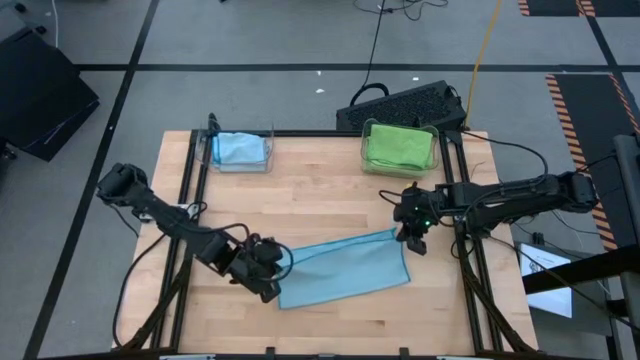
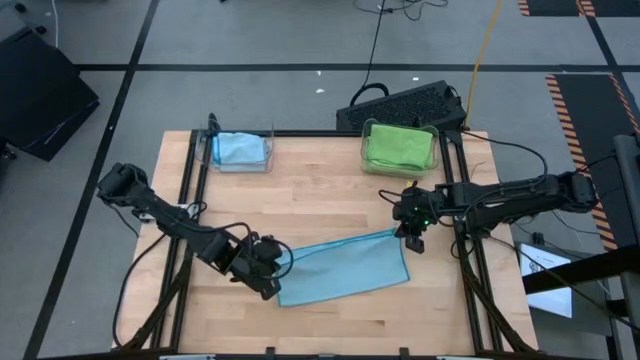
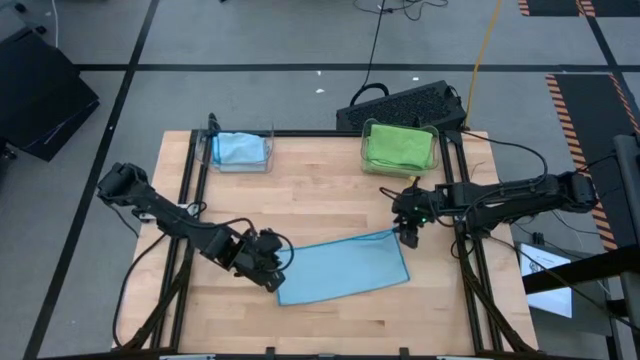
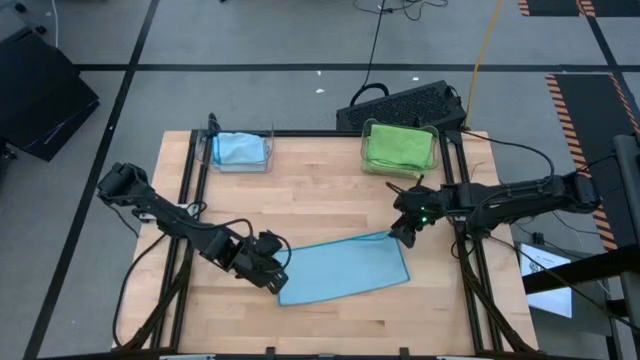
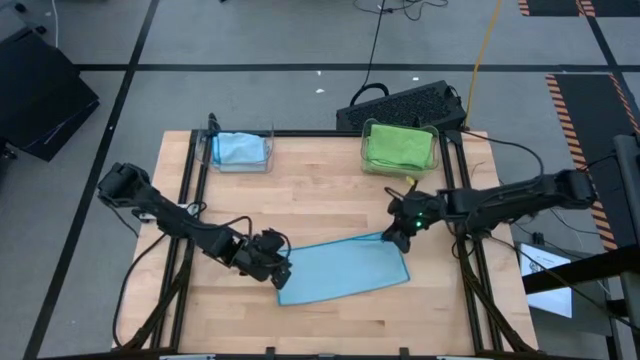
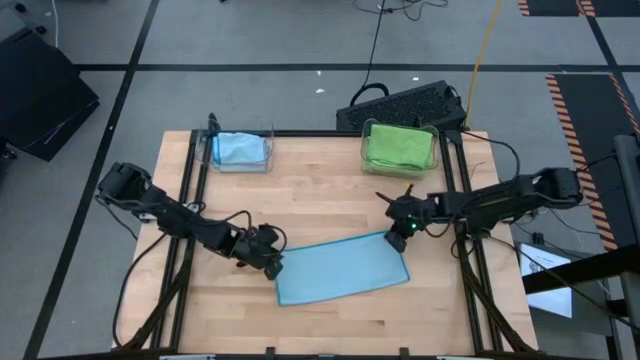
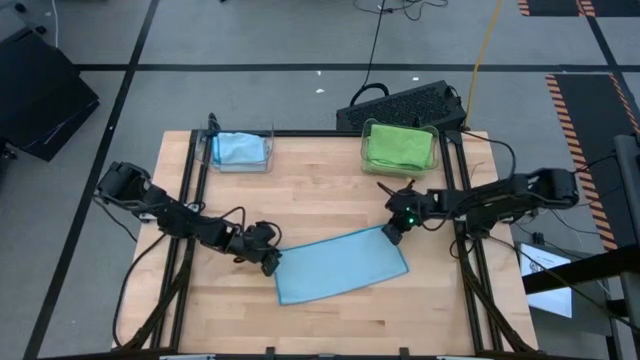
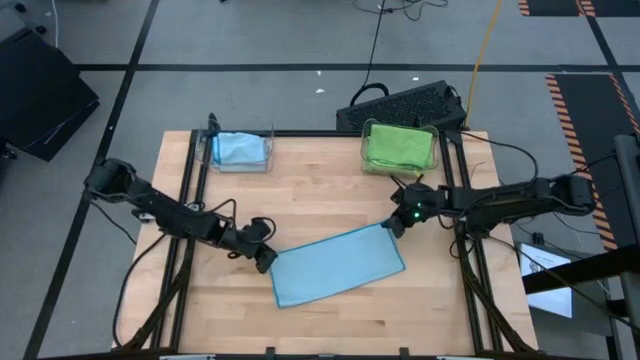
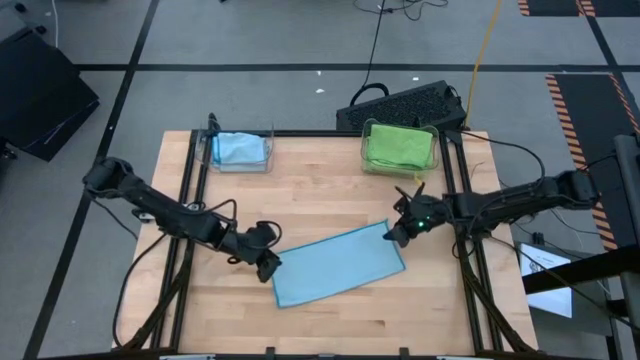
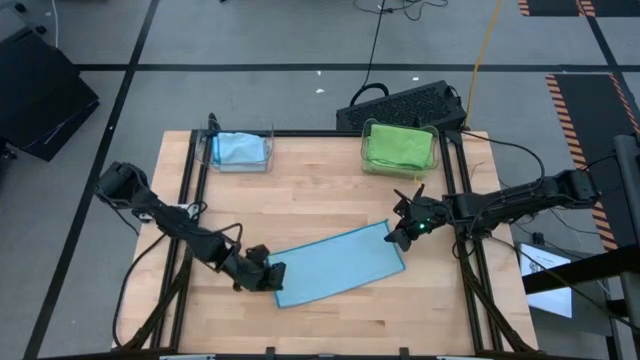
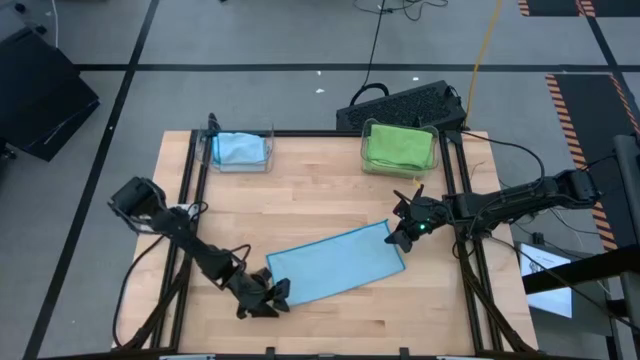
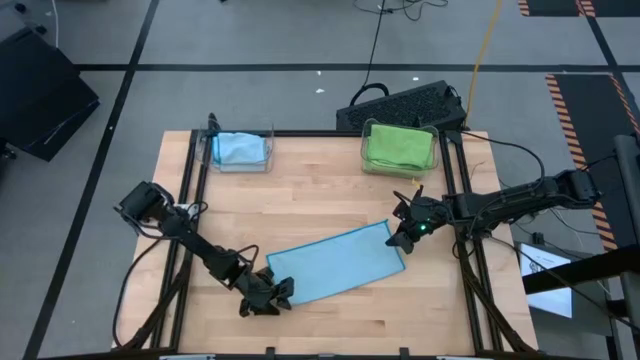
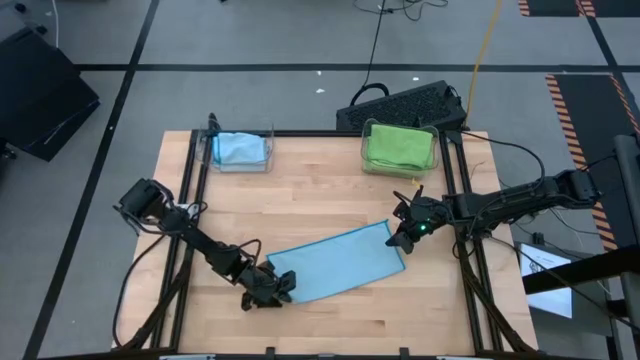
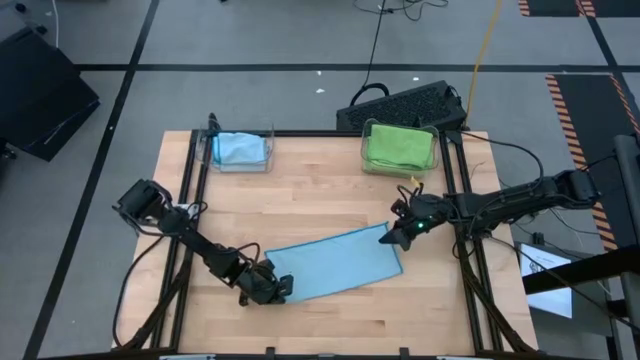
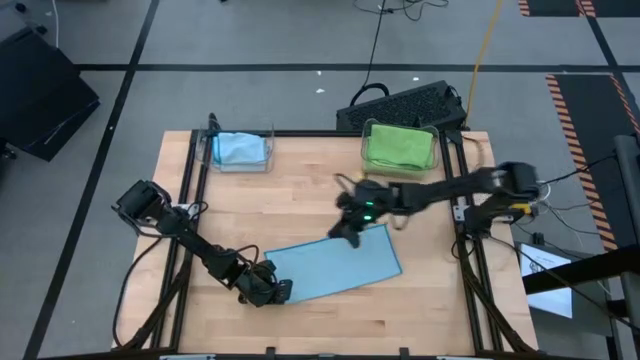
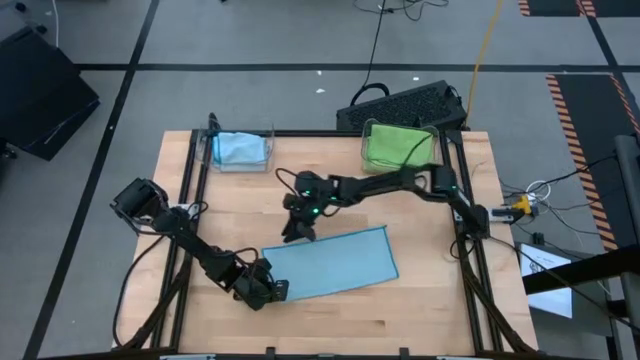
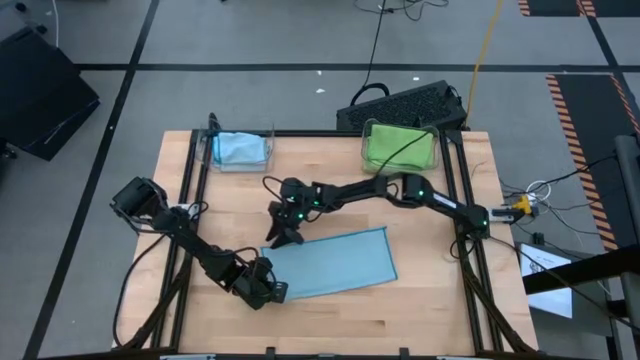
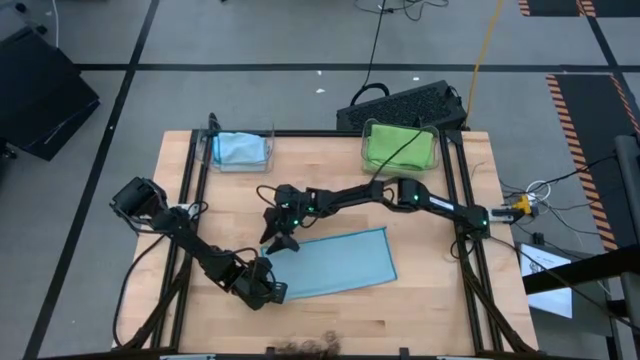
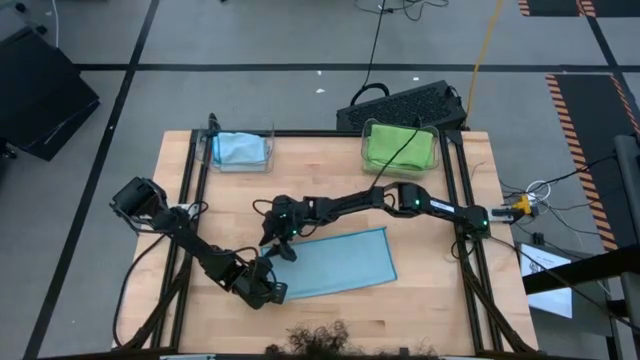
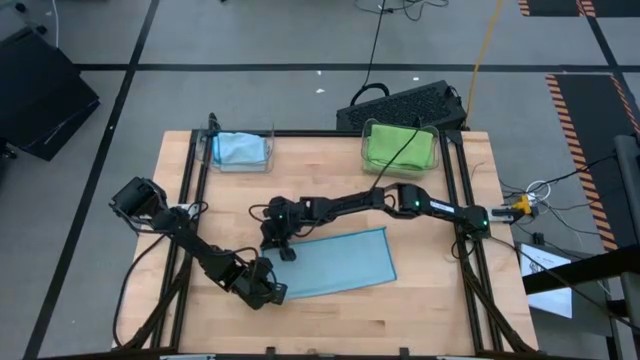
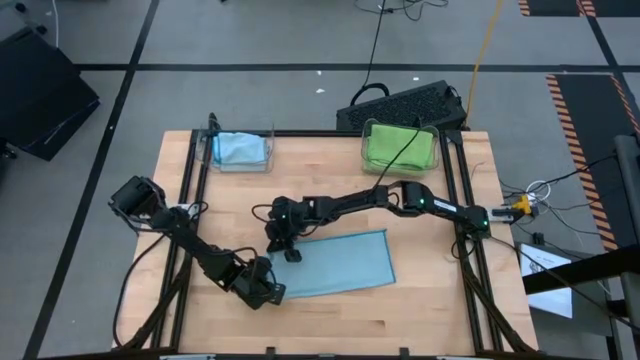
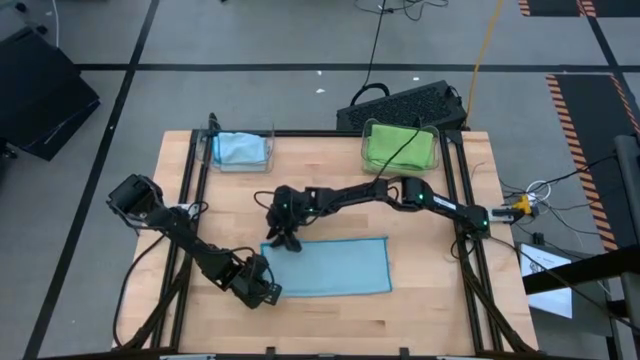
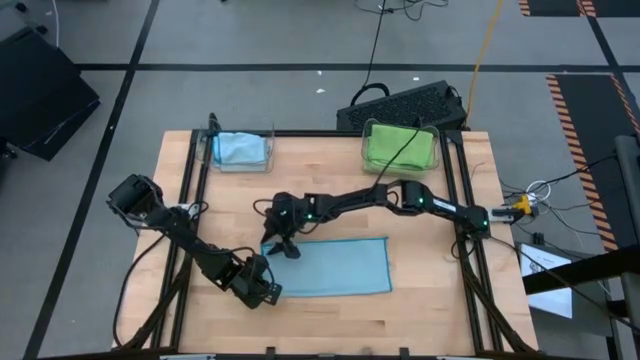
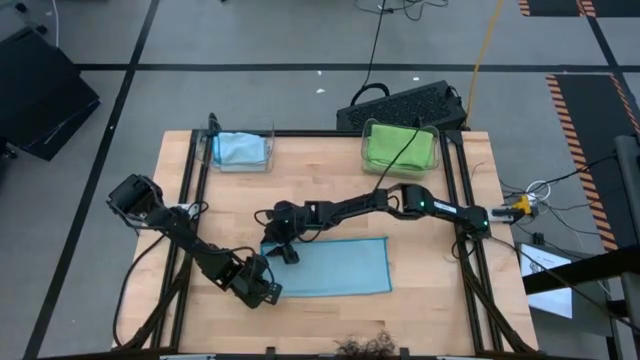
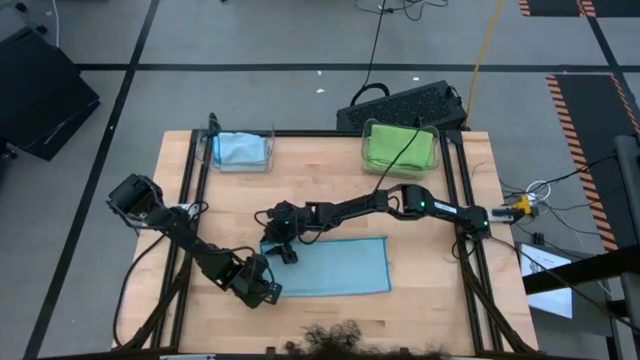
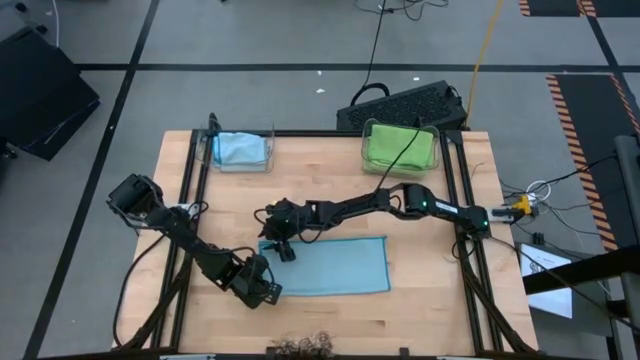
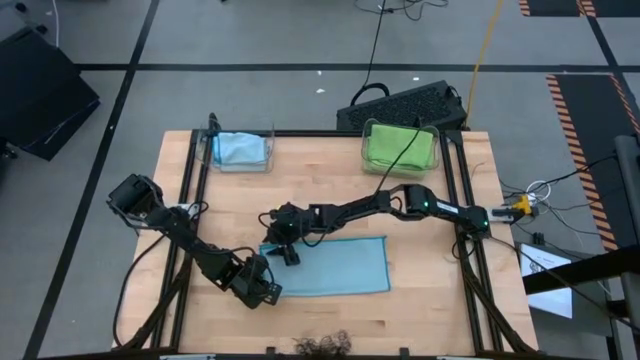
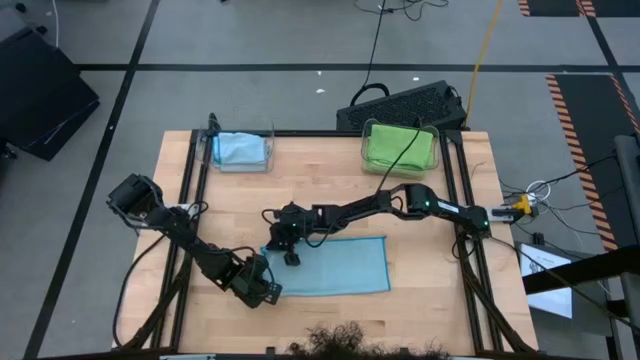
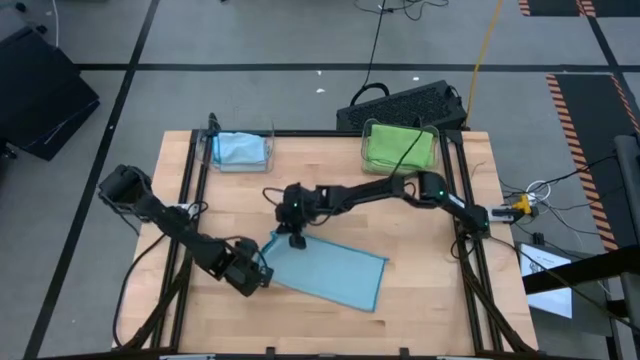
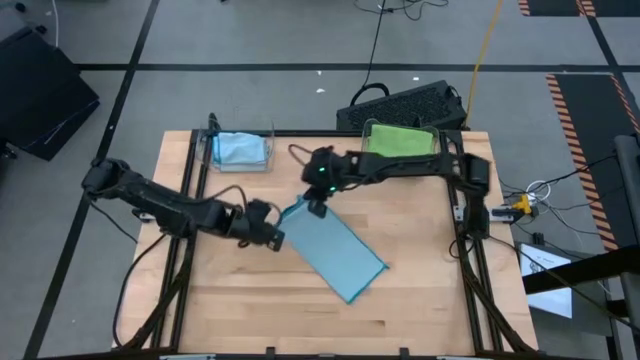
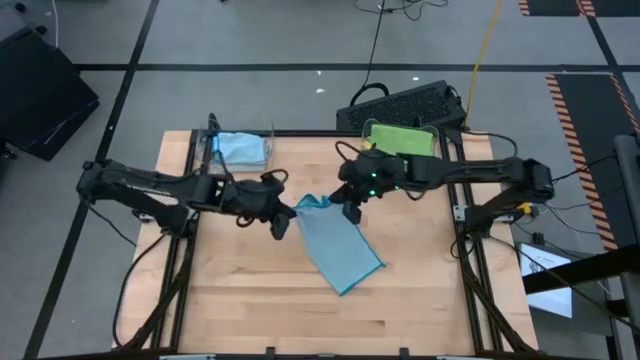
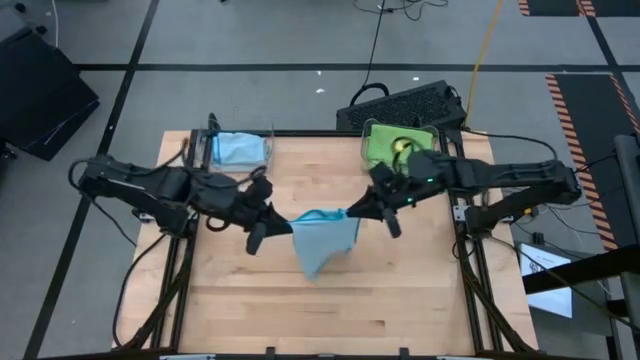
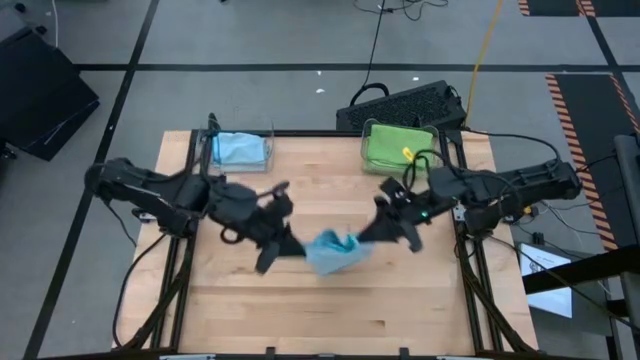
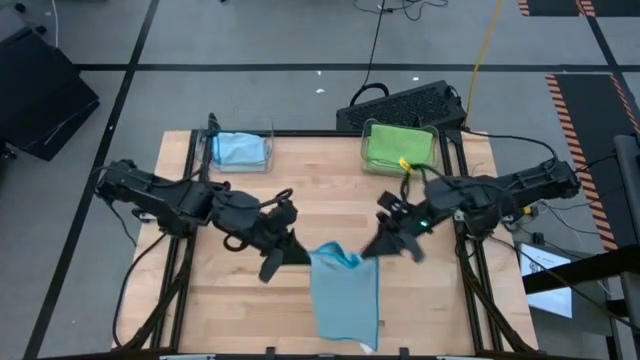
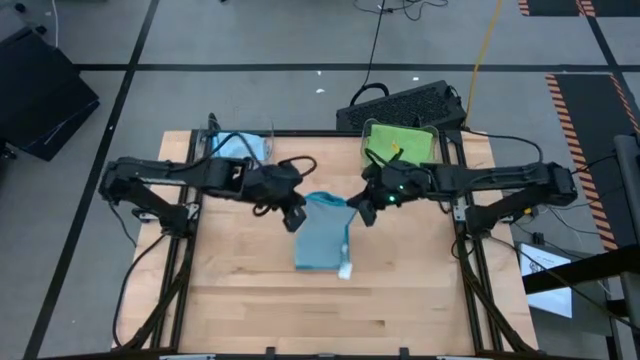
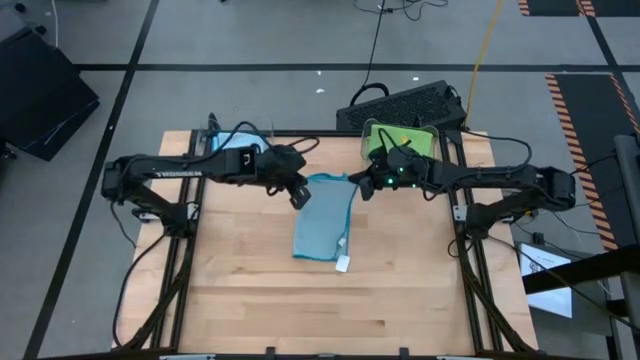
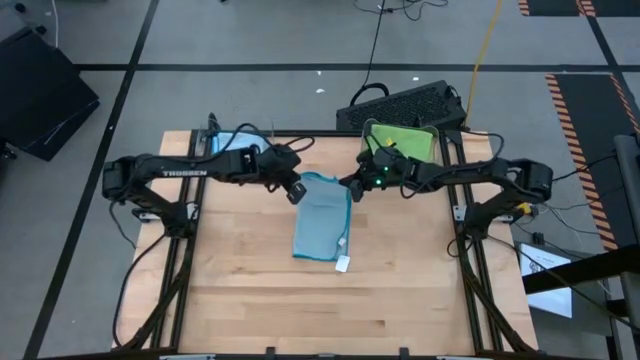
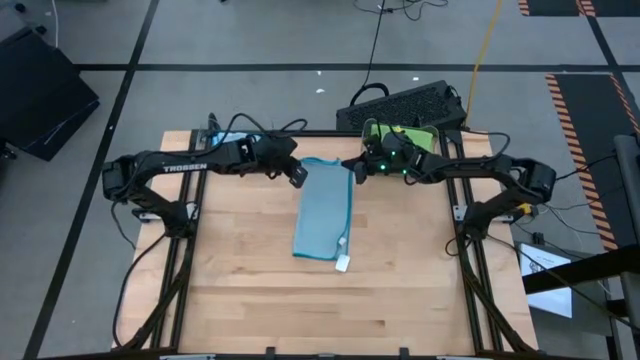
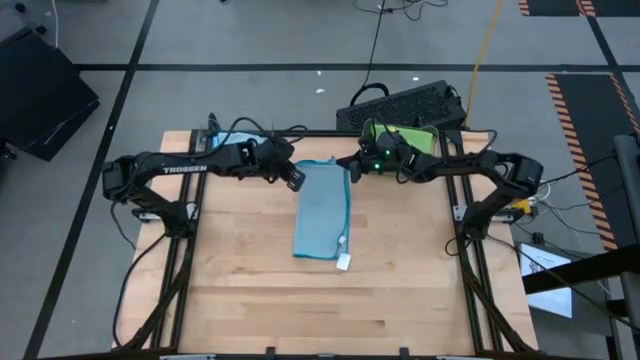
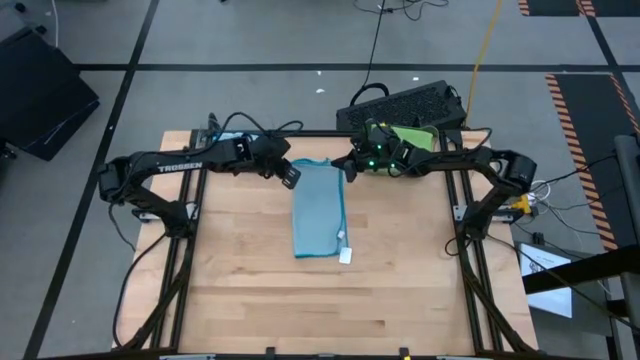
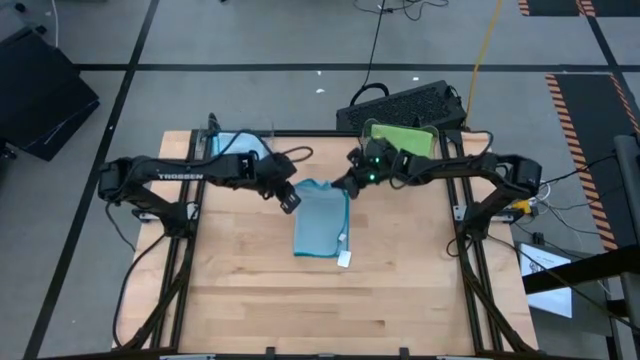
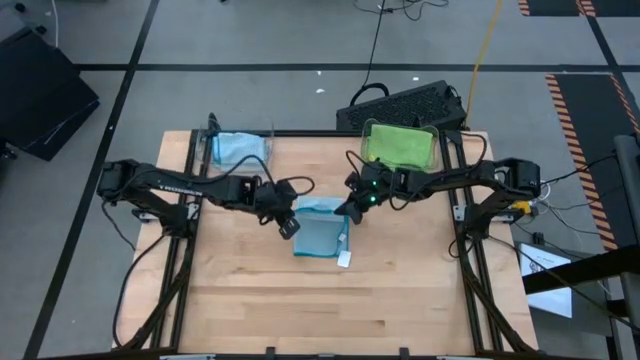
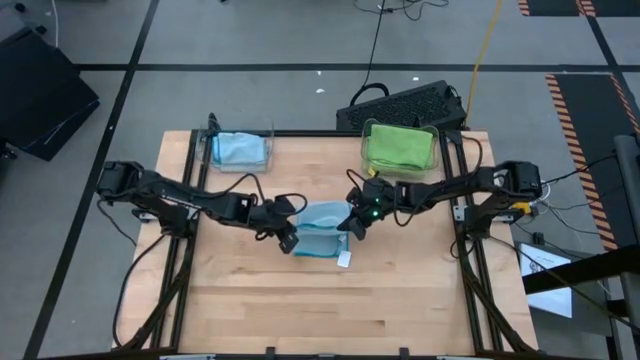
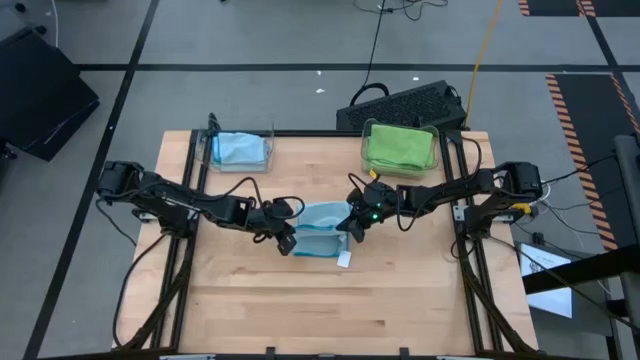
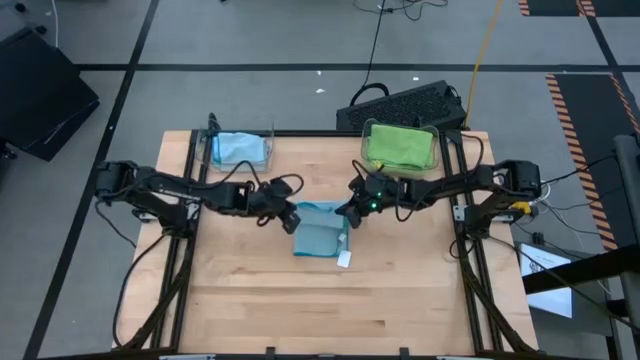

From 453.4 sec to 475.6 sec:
Task: Sort microfiber towel by color & place in baskets
Fold the blue towel
